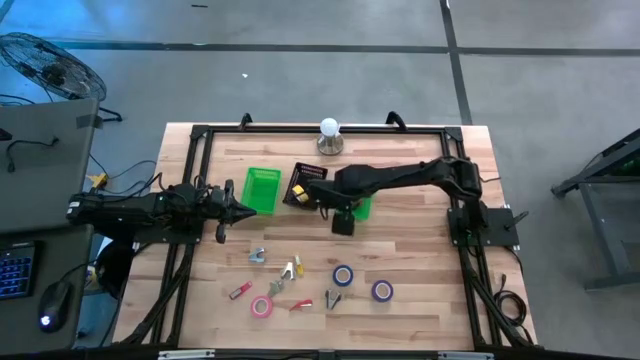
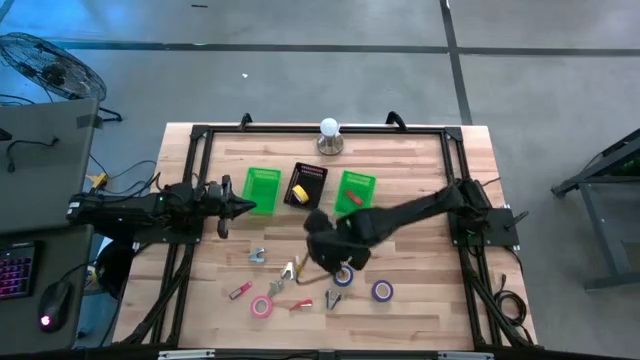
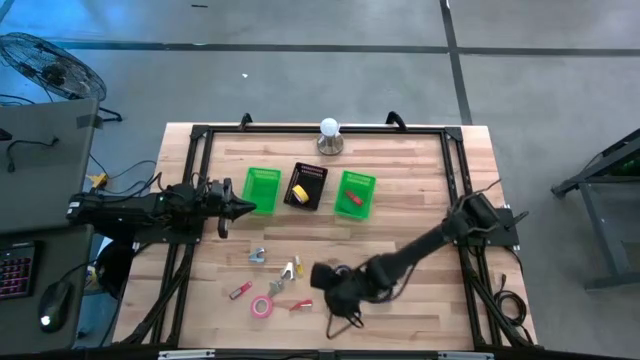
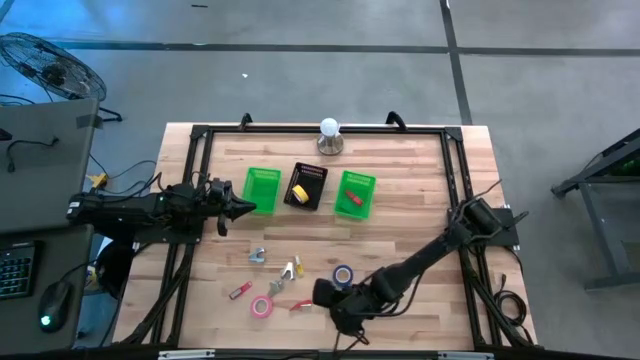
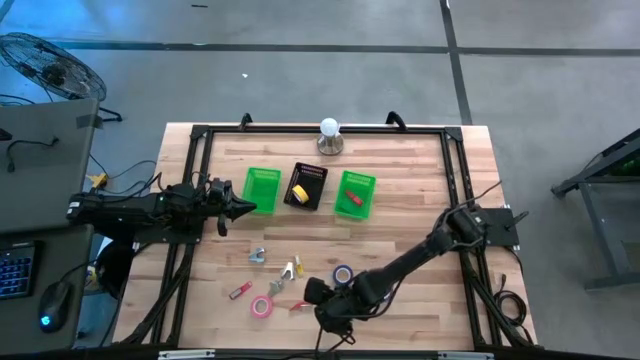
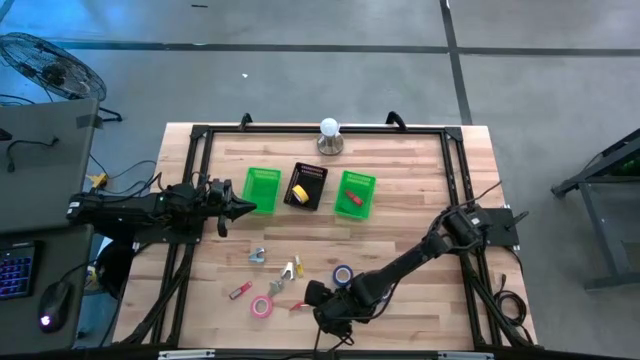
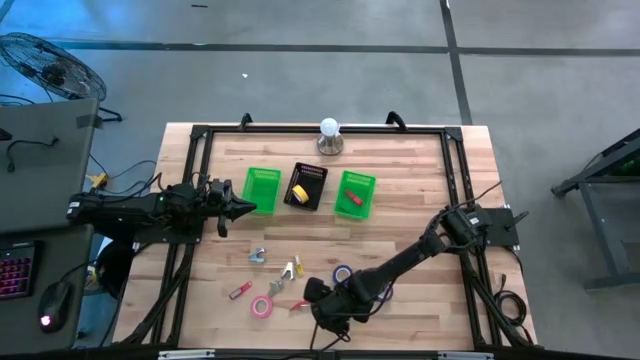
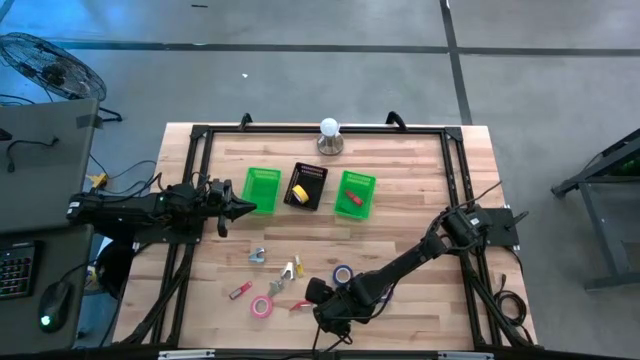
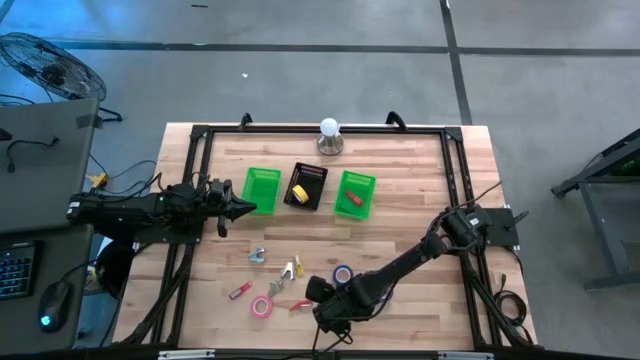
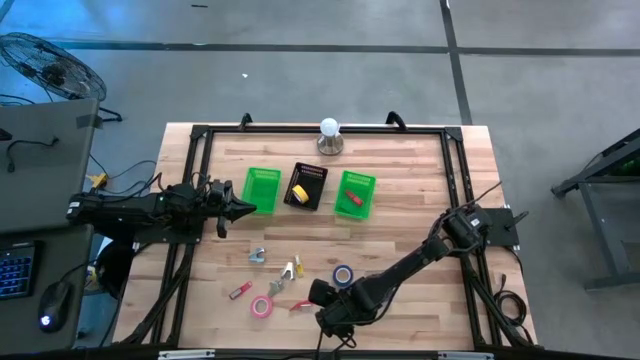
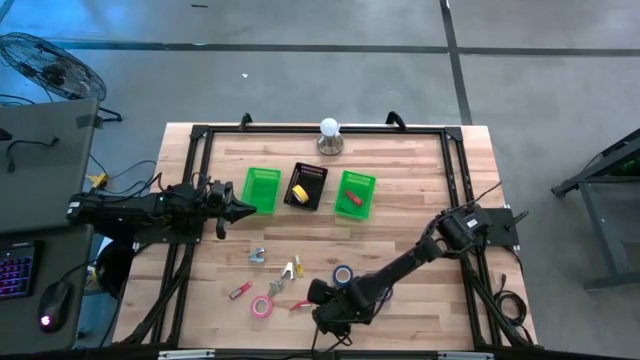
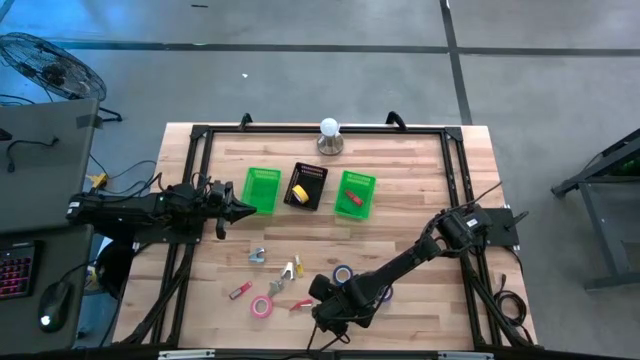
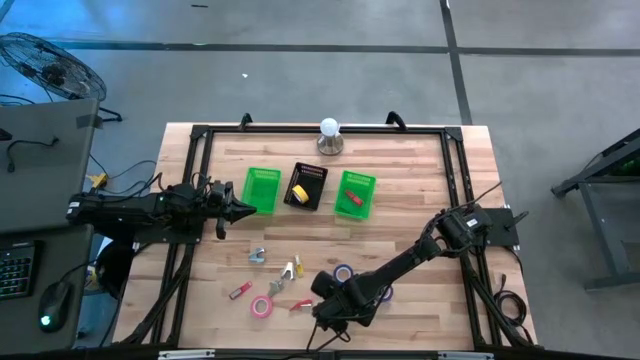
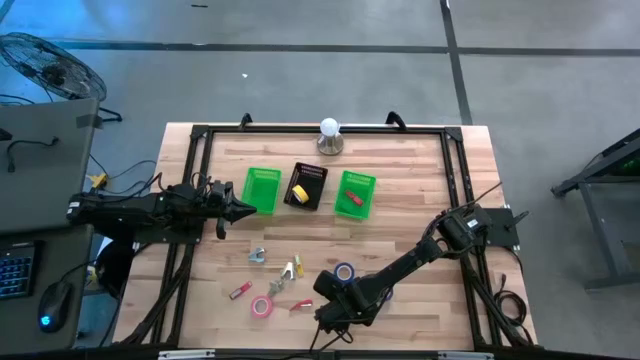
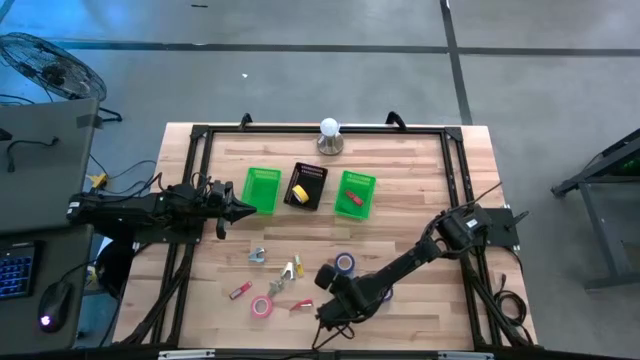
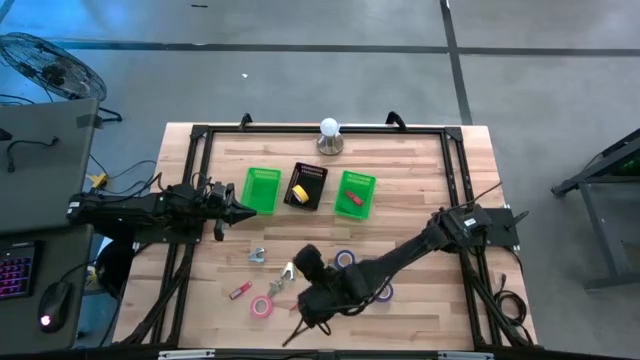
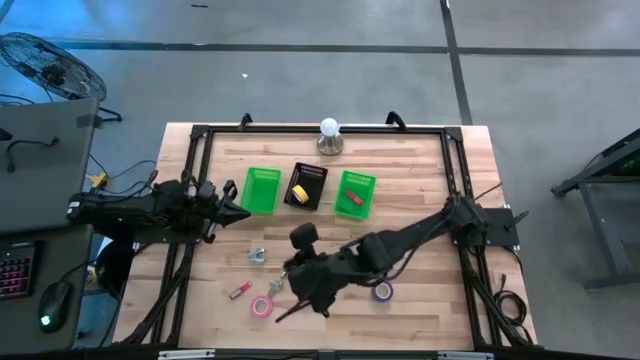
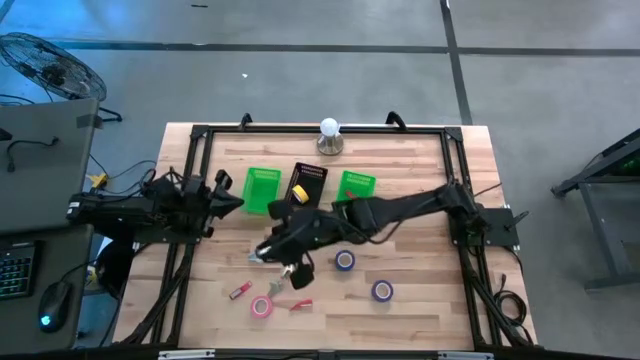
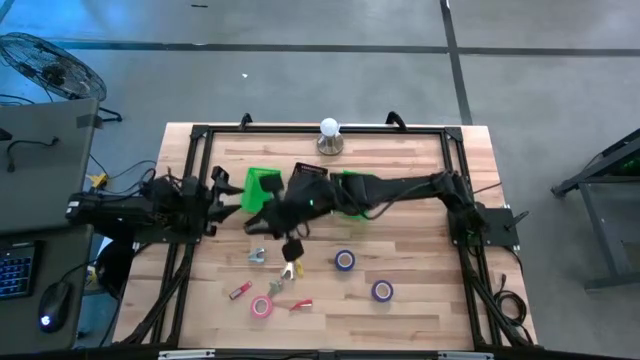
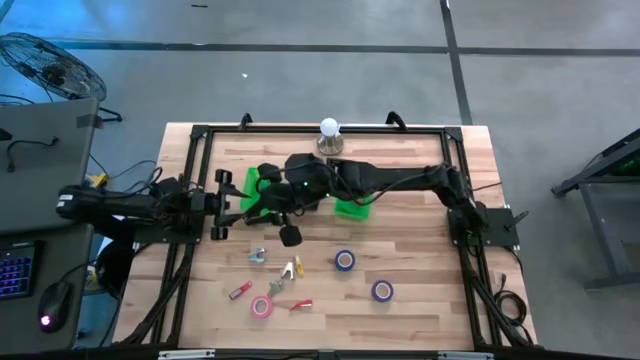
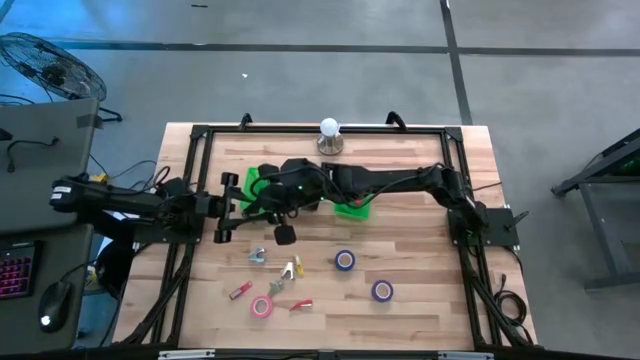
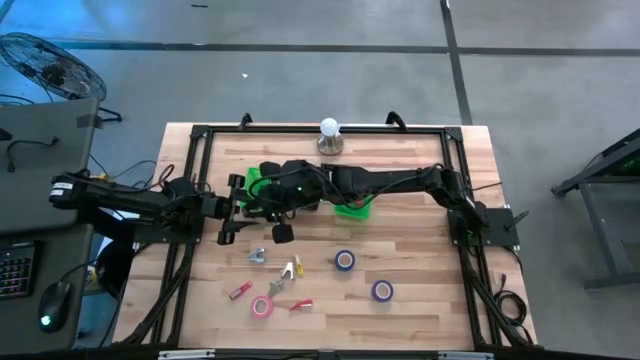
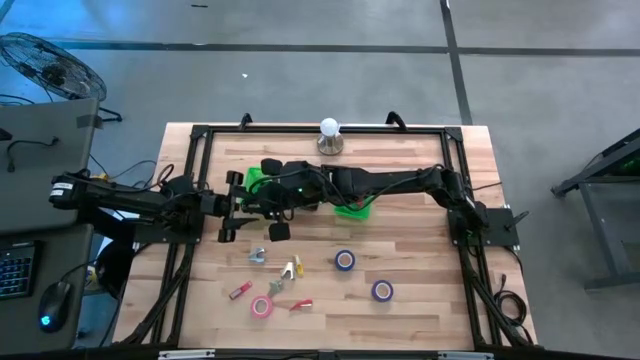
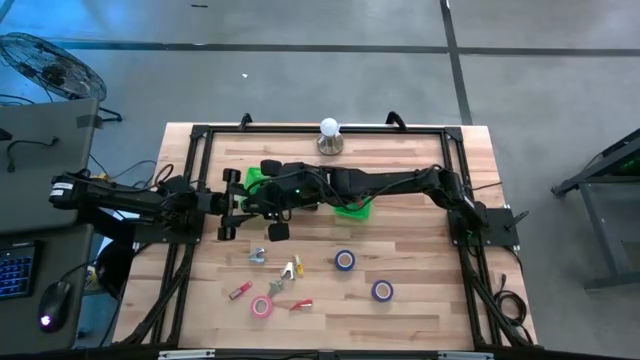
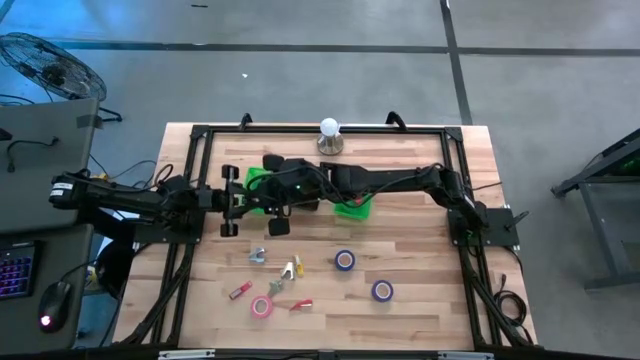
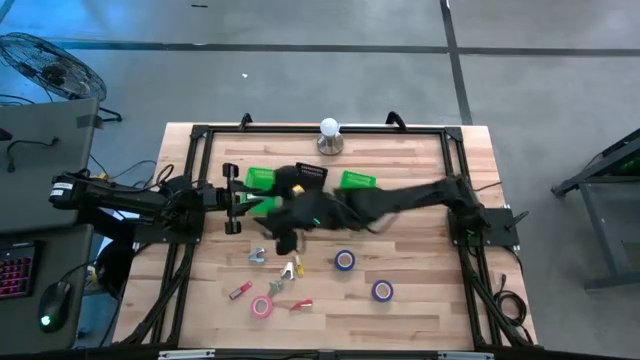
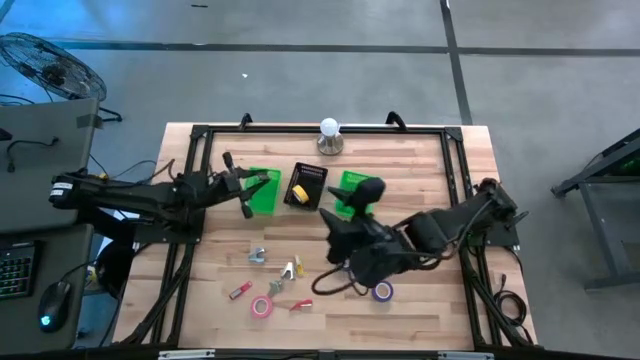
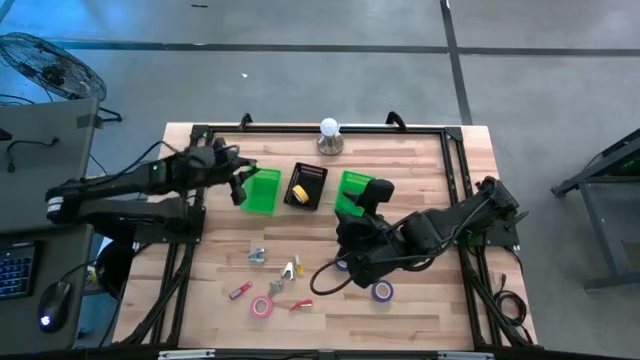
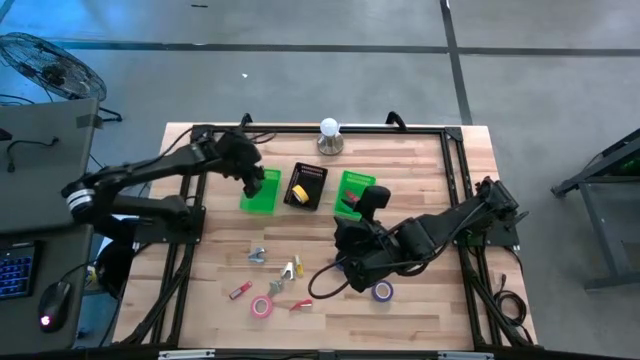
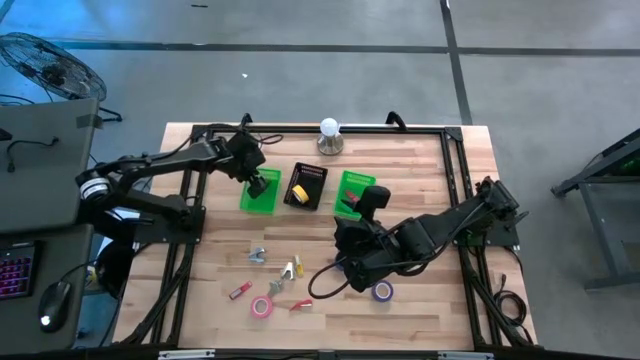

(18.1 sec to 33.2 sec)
Task: Pick and place Stapler, Stapler remover, tape
Put the black staple remover into the left green bin

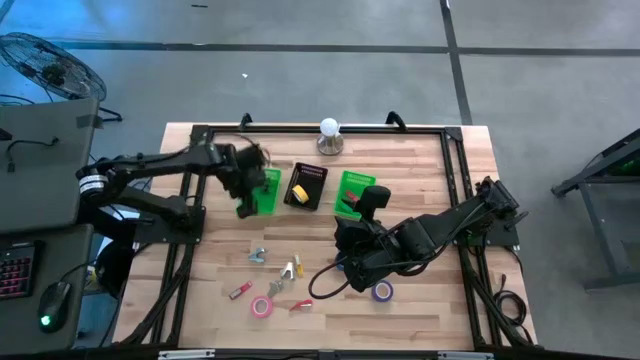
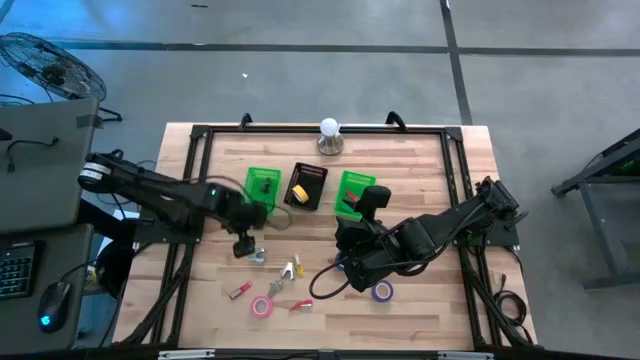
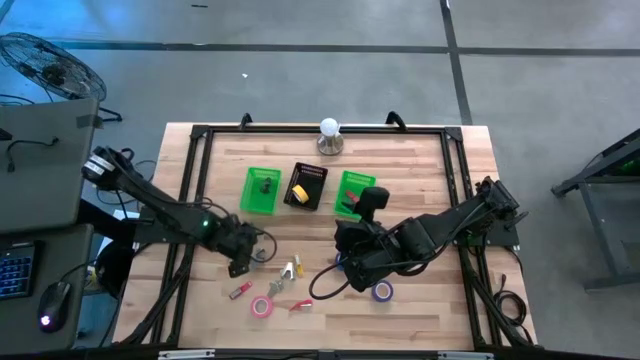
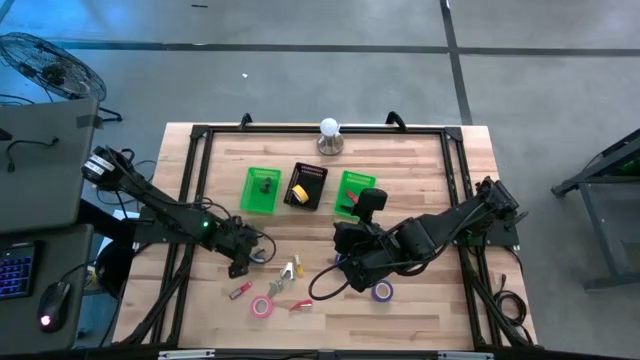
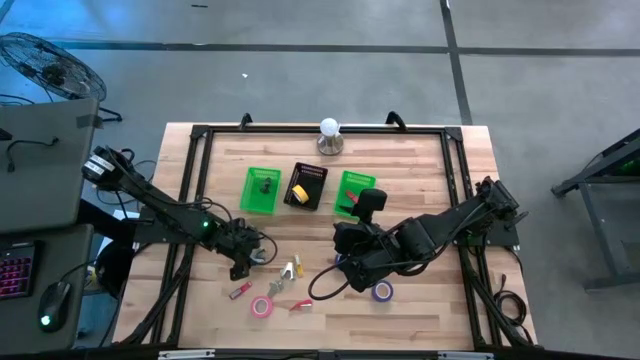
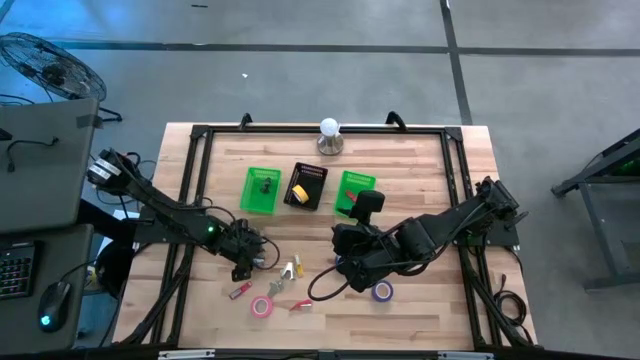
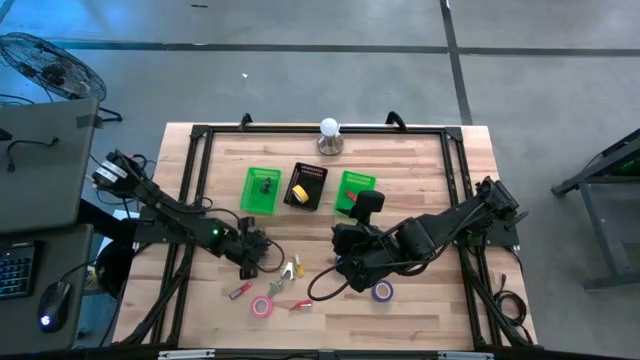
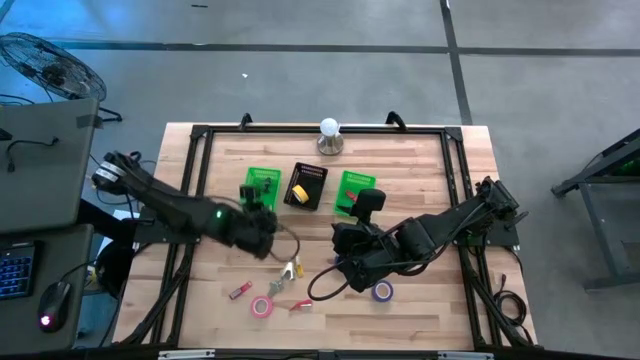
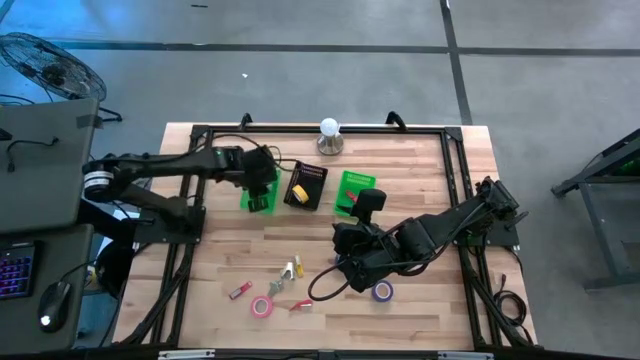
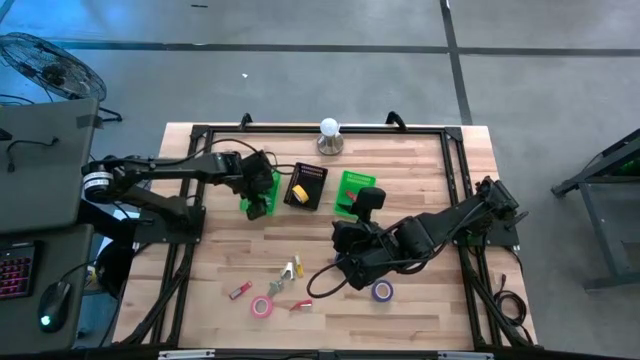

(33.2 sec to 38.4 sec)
Put the light blue staple remover into the left green bin

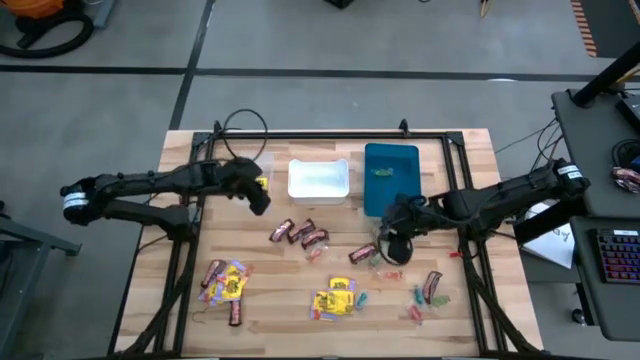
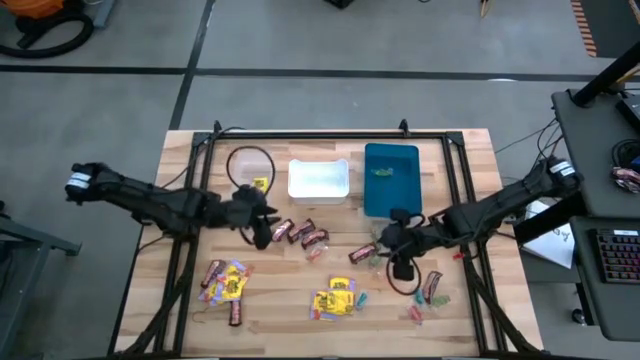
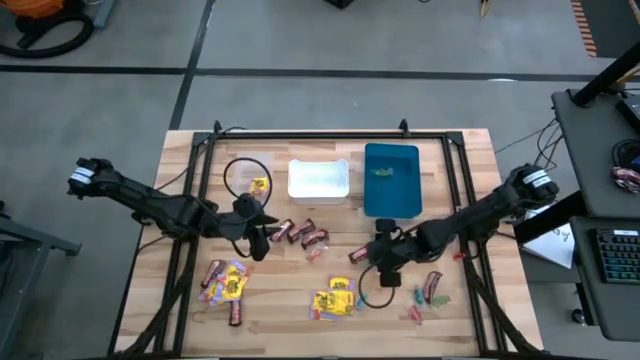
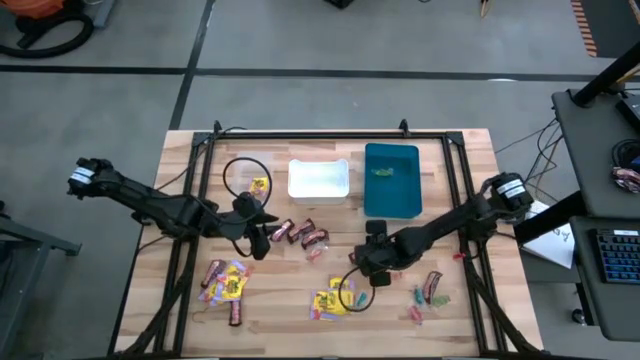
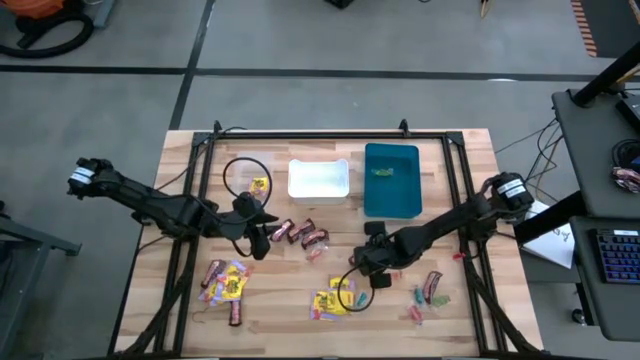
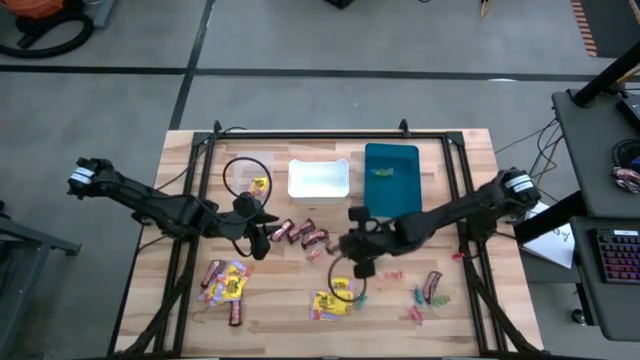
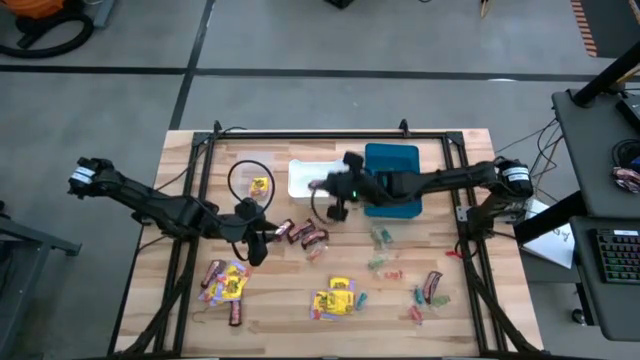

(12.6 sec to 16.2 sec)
Task: Sort candy
Put the brown chocolate into the white bin
